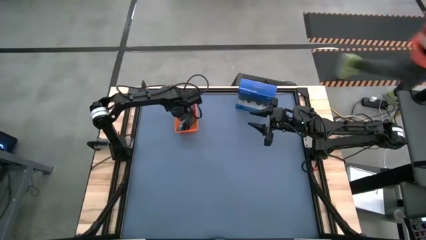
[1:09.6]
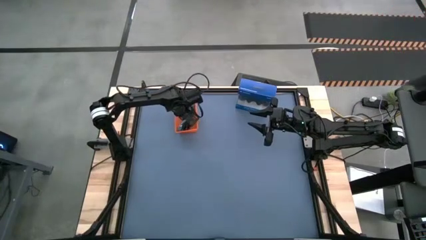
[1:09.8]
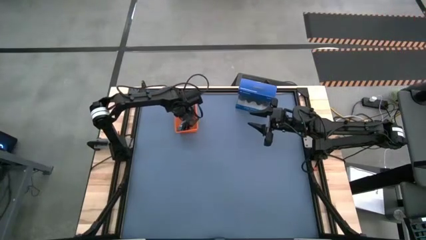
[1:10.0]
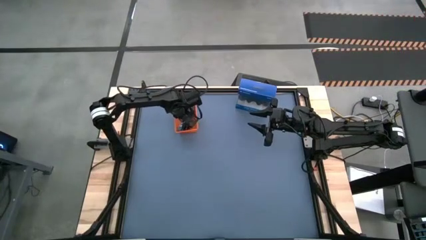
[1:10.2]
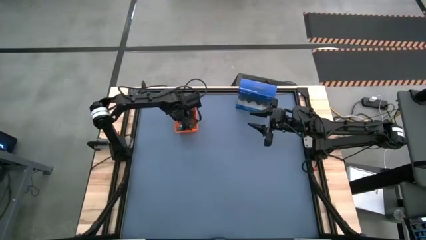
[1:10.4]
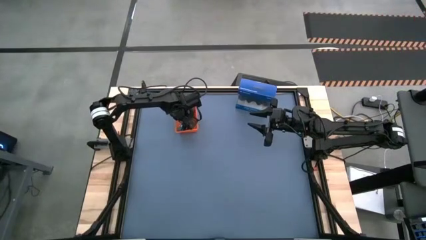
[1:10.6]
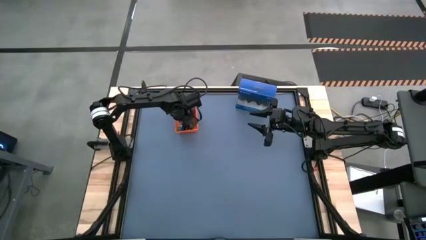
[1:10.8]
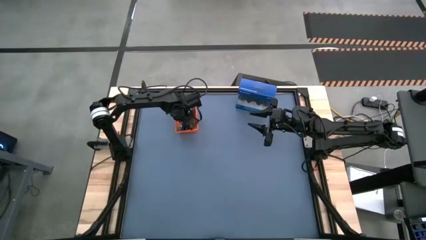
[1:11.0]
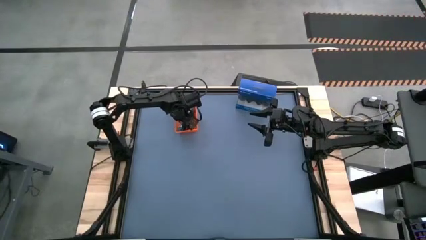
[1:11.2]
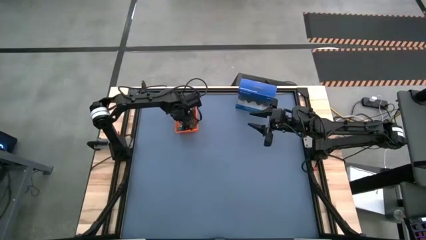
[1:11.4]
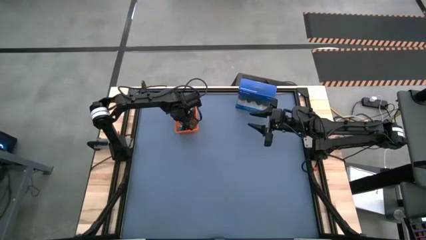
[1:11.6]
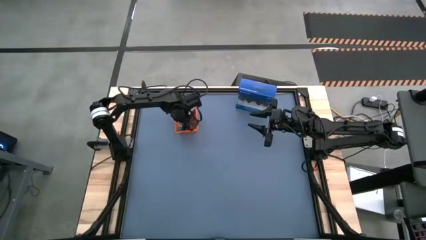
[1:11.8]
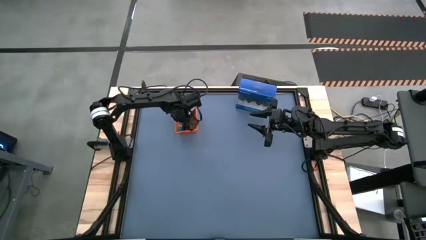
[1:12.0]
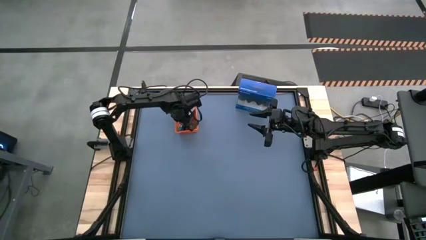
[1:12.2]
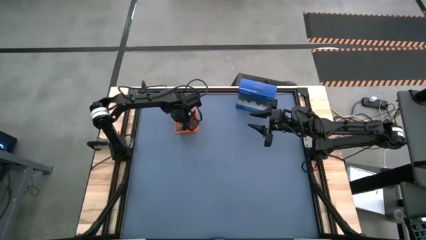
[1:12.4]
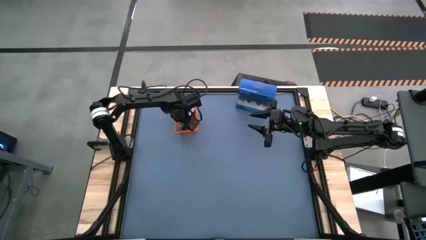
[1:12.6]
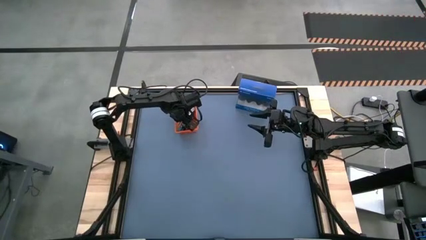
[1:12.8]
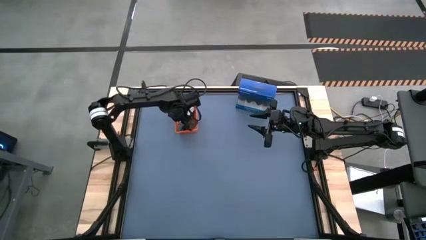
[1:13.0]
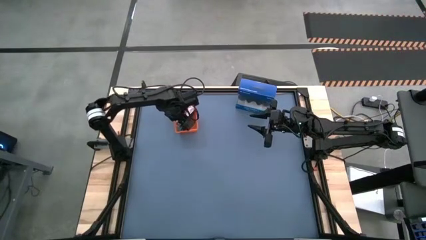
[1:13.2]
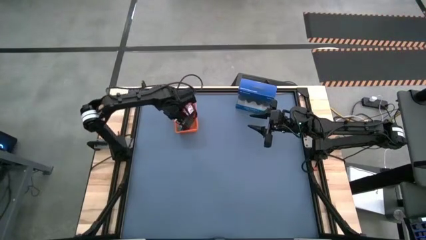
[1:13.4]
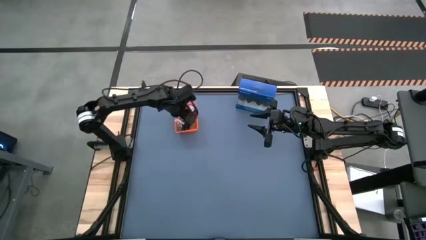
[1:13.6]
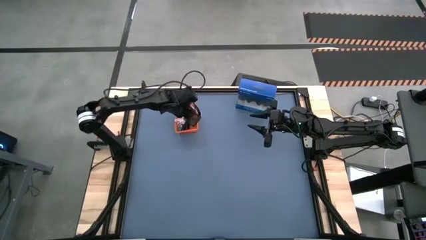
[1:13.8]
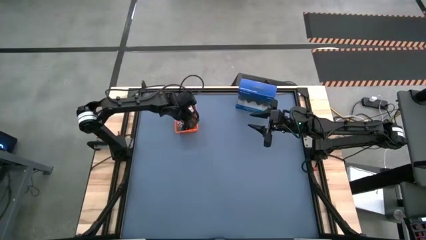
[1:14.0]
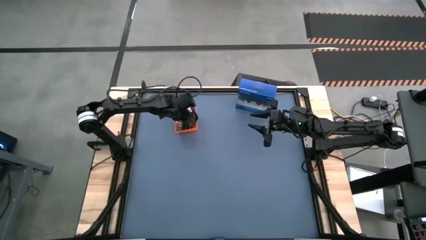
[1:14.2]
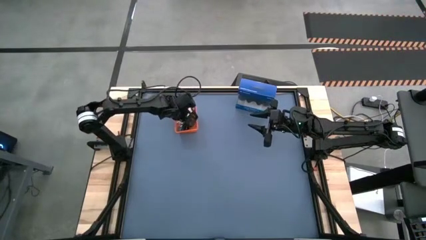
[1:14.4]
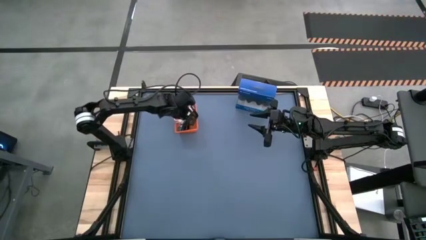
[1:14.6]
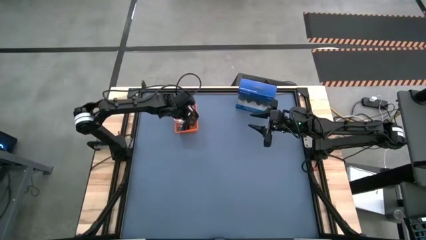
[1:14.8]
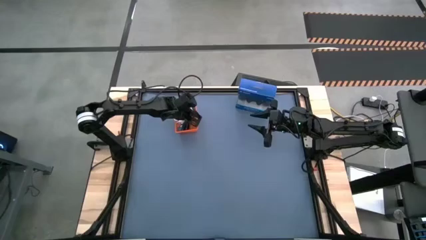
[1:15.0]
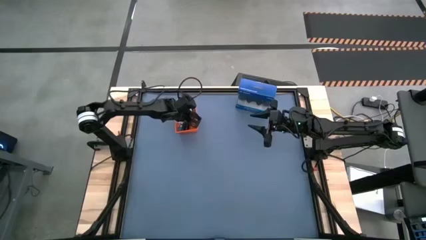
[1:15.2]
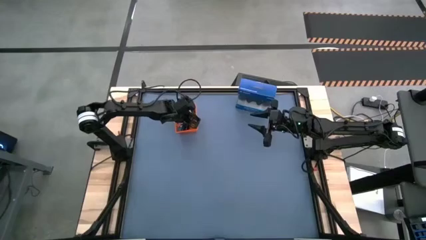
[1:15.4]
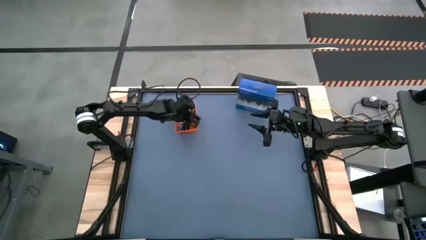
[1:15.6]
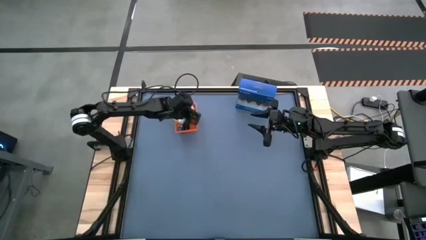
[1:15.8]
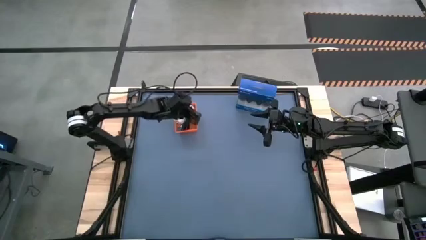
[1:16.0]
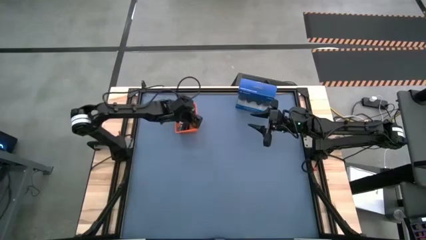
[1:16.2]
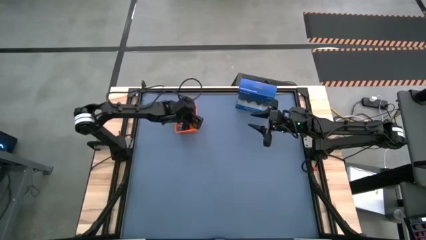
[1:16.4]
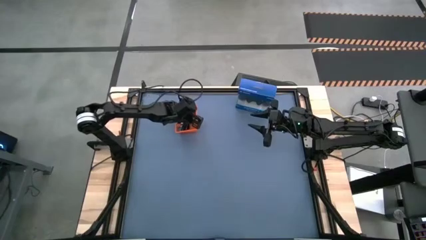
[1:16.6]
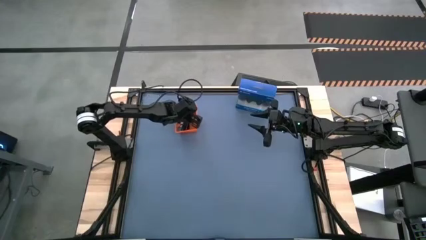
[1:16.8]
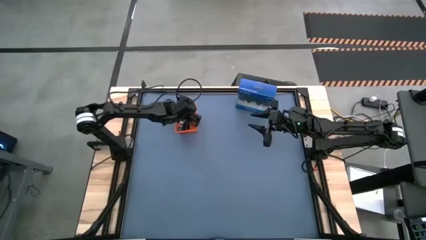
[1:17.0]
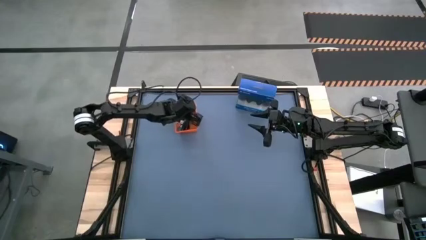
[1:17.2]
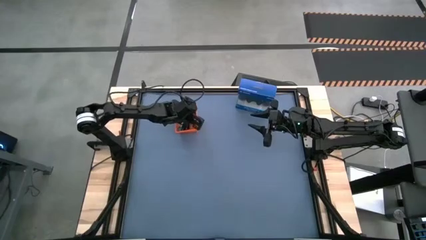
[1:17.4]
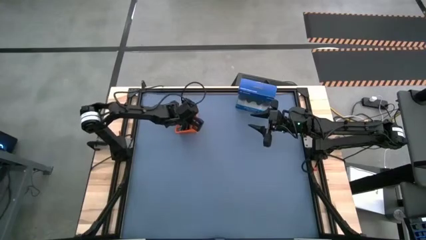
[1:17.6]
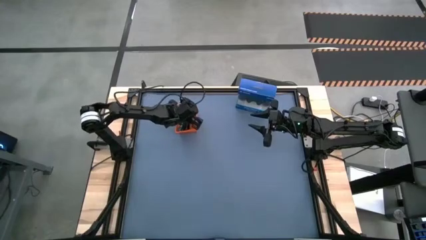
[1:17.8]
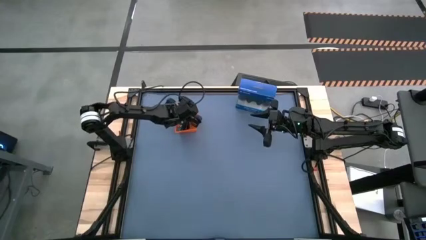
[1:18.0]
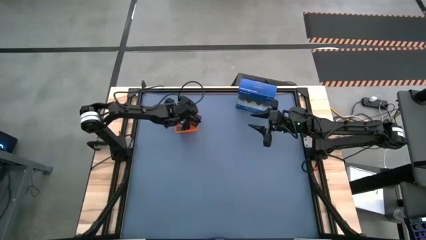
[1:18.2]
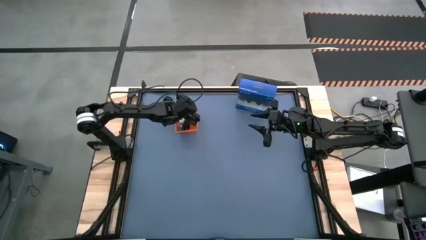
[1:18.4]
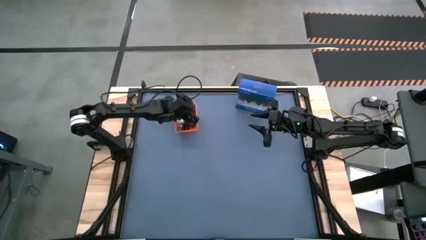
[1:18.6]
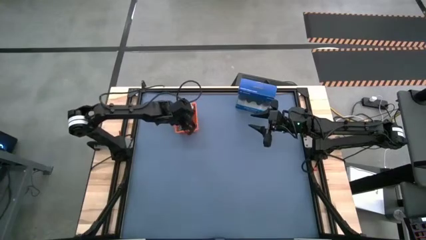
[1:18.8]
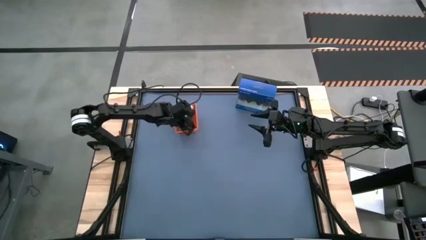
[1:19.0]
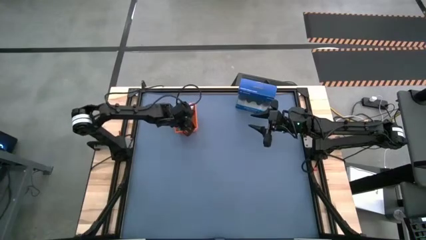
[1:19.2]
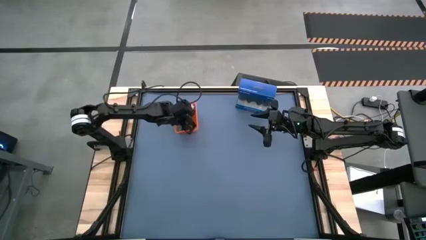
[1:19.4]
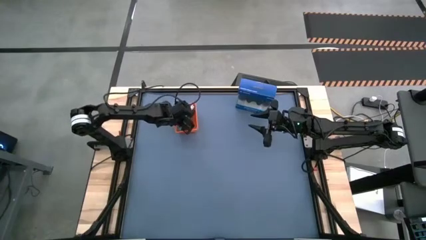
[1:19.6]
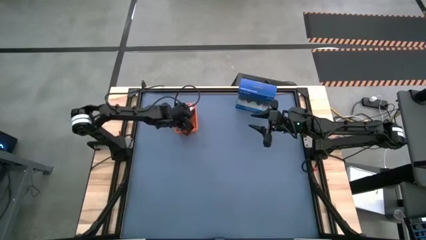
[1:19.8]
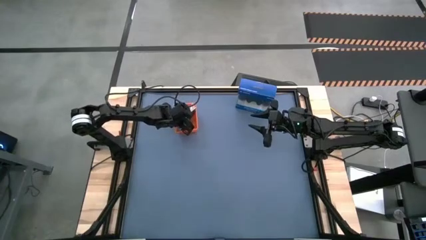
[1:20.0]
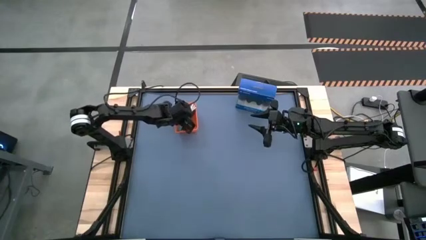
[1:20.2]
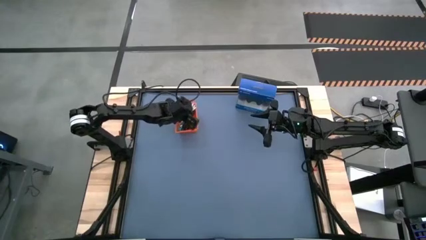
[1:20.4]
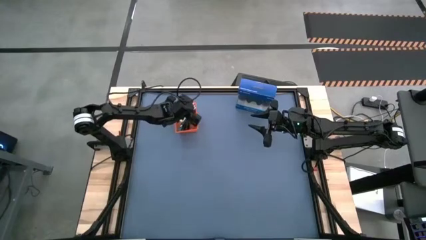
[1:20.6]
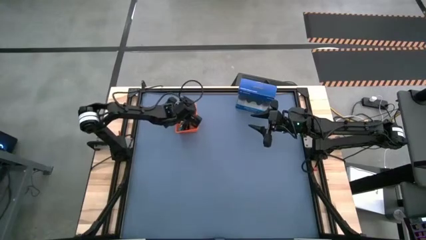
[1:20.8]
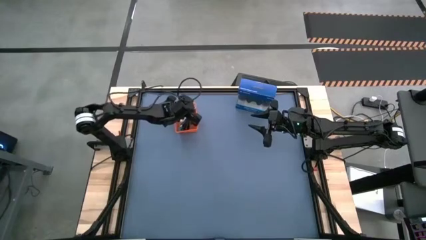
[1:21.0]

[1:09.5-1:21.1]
Task: Pick and place USB-C Cables
Put the white charger cable into the orange bin
